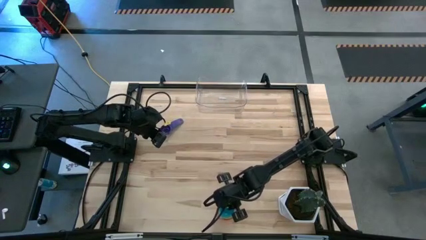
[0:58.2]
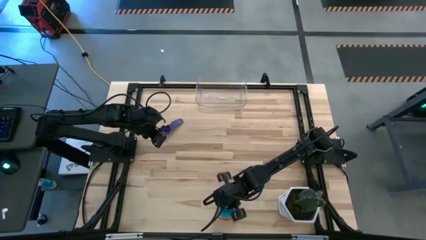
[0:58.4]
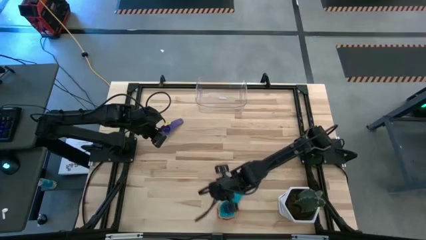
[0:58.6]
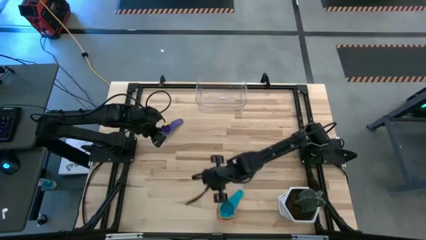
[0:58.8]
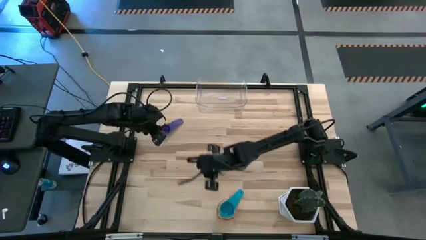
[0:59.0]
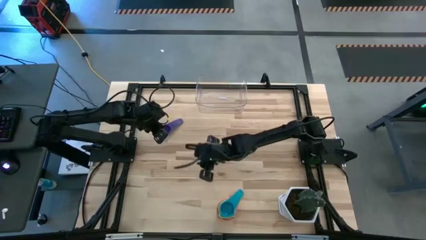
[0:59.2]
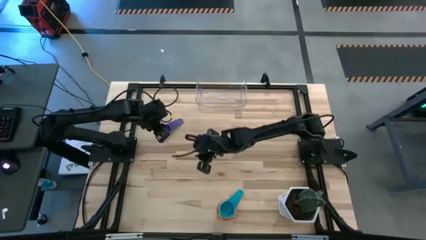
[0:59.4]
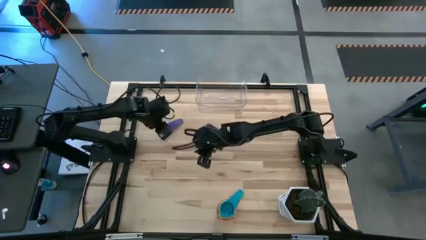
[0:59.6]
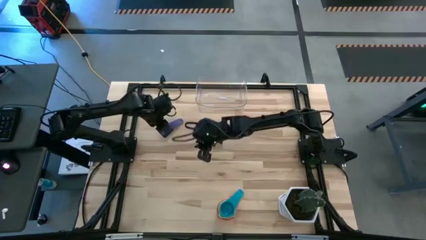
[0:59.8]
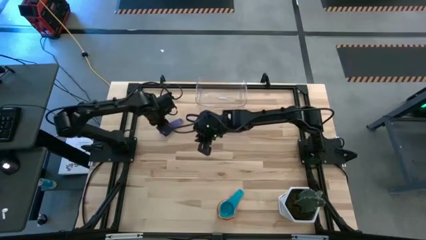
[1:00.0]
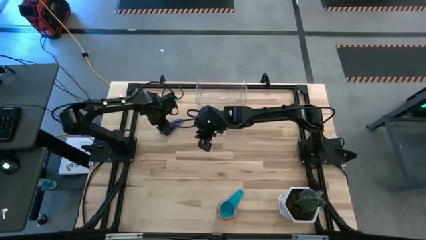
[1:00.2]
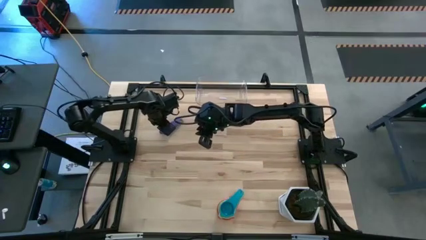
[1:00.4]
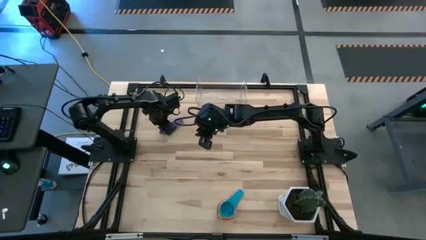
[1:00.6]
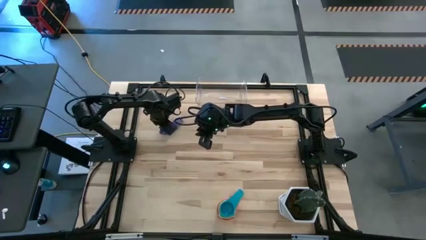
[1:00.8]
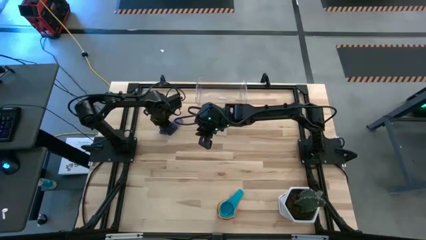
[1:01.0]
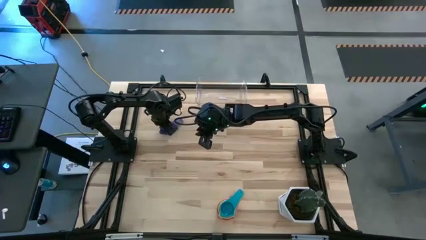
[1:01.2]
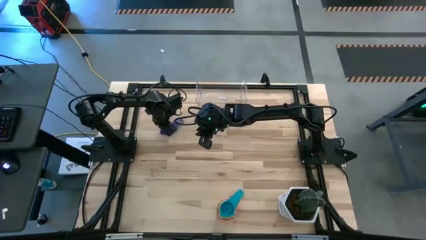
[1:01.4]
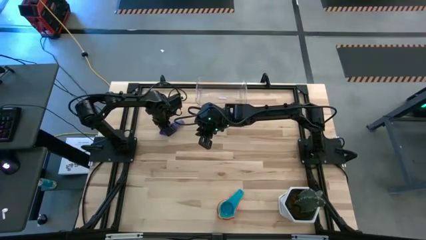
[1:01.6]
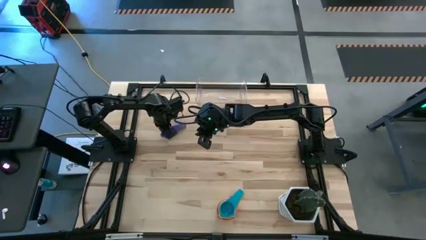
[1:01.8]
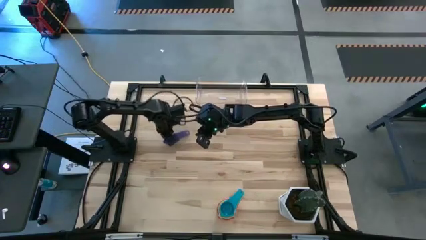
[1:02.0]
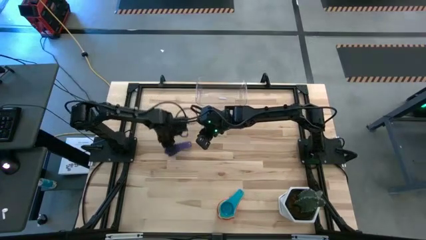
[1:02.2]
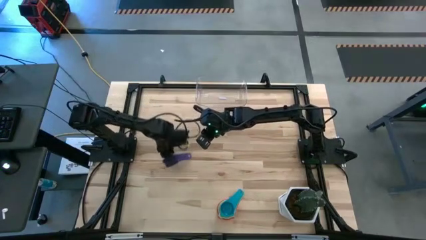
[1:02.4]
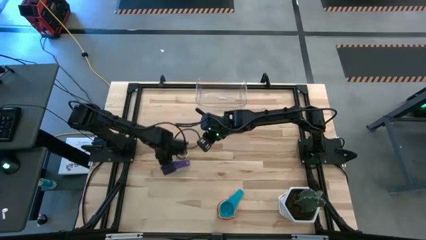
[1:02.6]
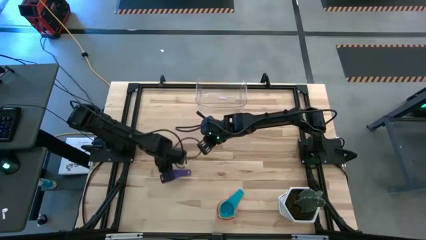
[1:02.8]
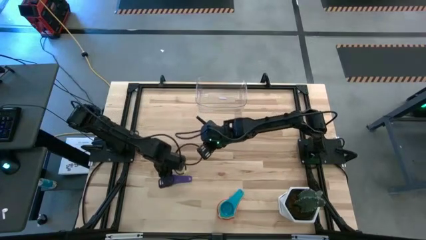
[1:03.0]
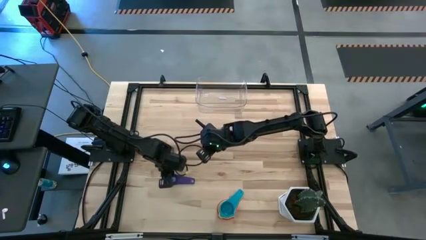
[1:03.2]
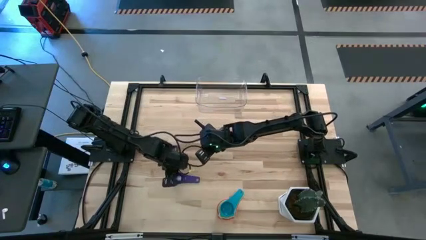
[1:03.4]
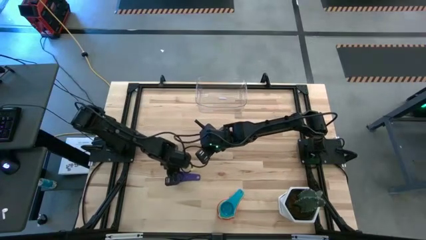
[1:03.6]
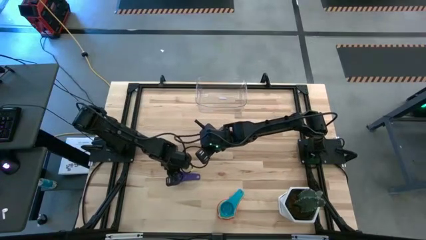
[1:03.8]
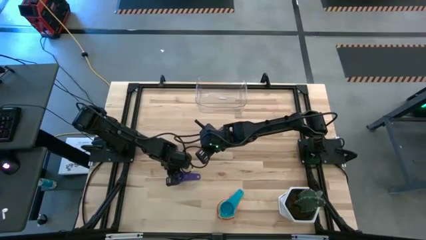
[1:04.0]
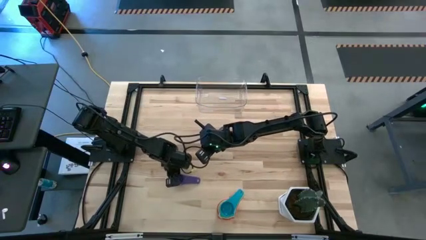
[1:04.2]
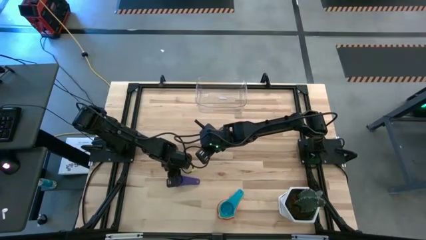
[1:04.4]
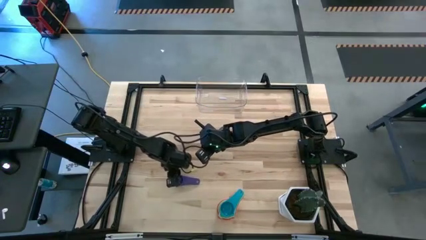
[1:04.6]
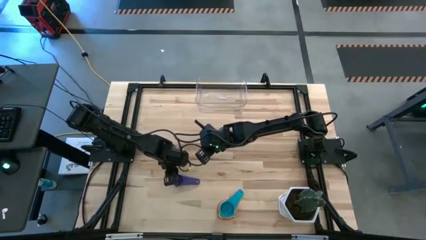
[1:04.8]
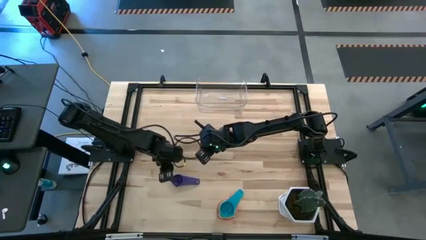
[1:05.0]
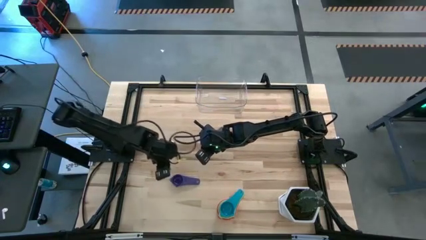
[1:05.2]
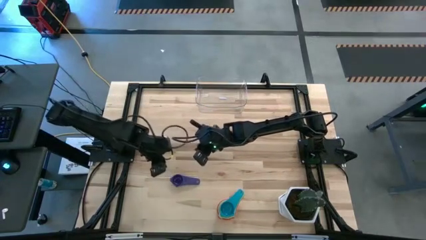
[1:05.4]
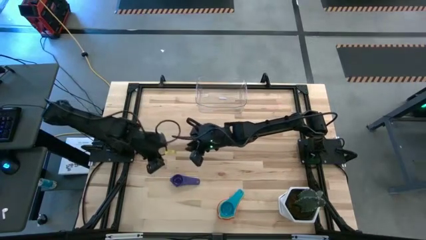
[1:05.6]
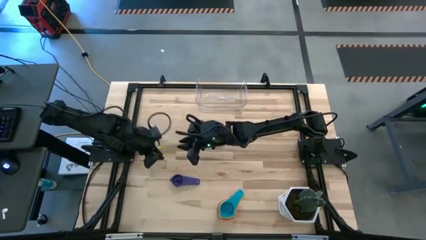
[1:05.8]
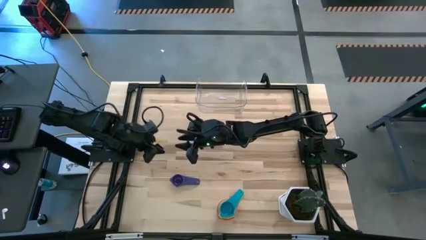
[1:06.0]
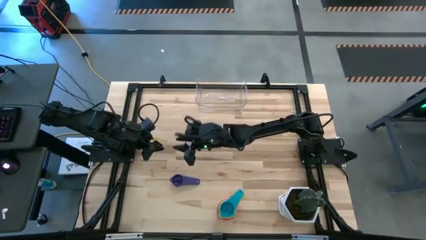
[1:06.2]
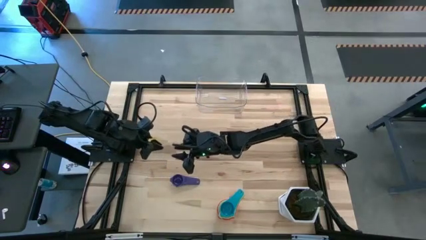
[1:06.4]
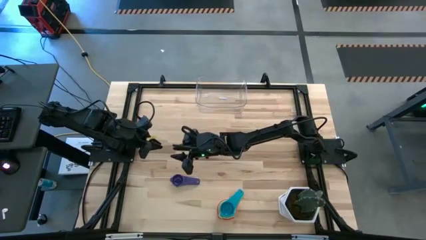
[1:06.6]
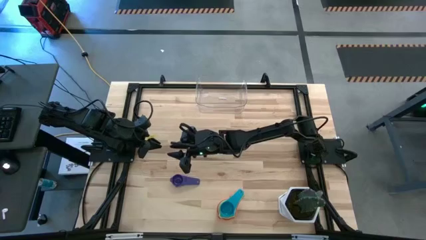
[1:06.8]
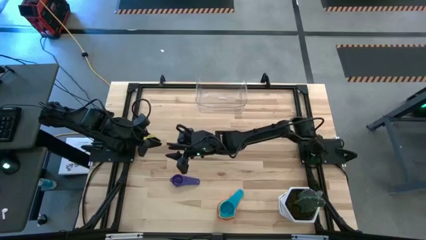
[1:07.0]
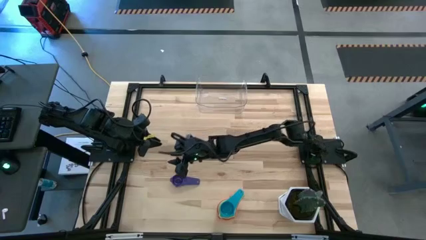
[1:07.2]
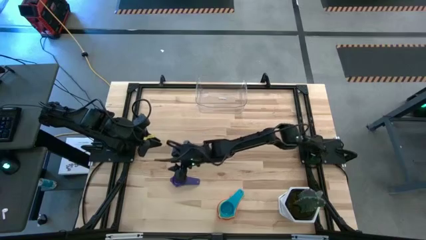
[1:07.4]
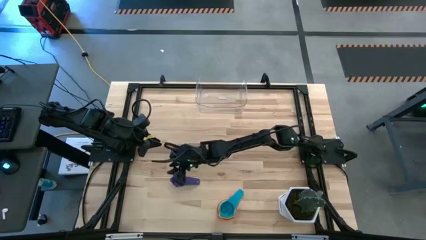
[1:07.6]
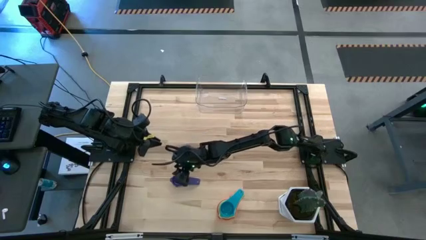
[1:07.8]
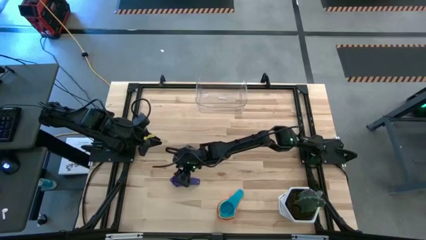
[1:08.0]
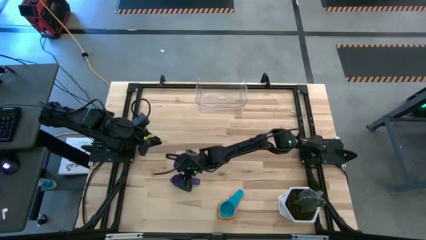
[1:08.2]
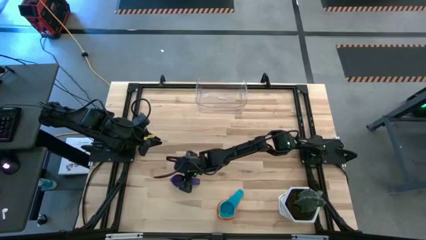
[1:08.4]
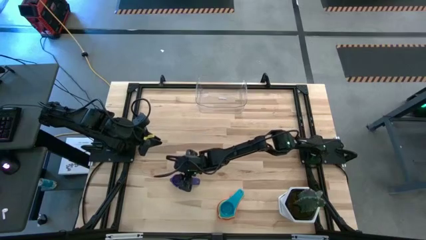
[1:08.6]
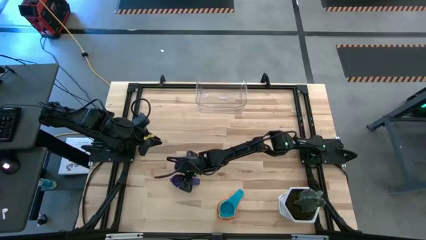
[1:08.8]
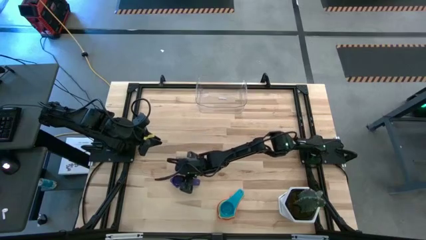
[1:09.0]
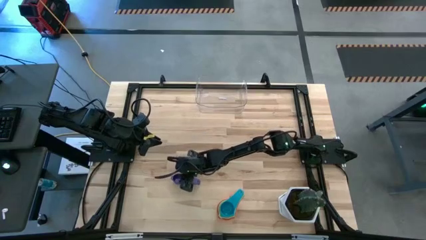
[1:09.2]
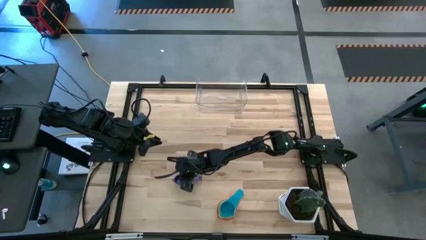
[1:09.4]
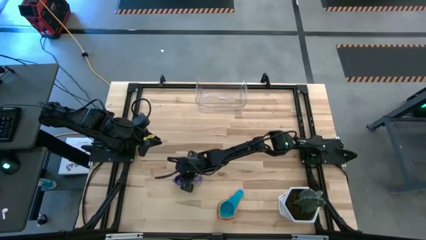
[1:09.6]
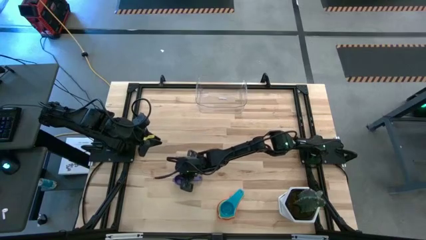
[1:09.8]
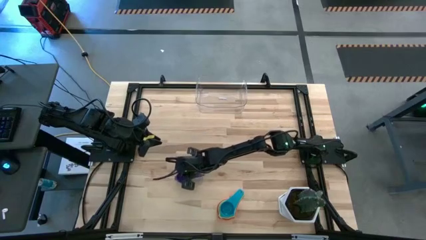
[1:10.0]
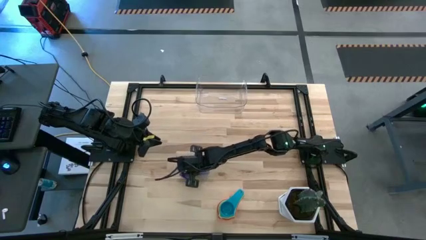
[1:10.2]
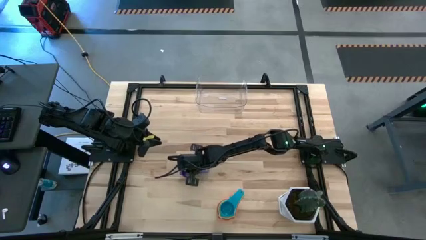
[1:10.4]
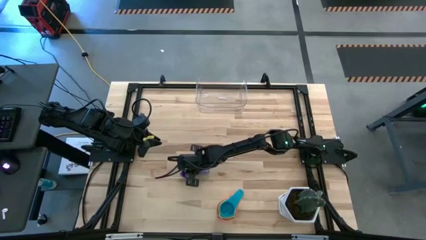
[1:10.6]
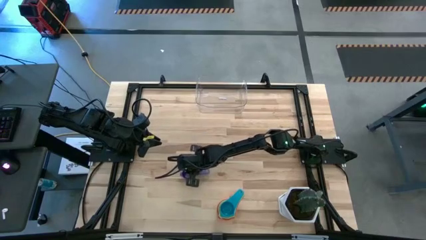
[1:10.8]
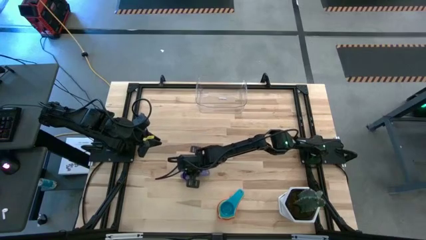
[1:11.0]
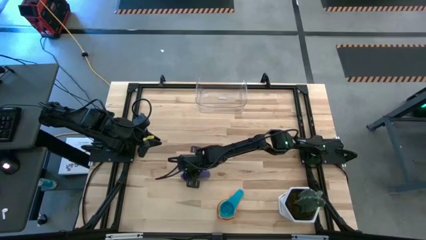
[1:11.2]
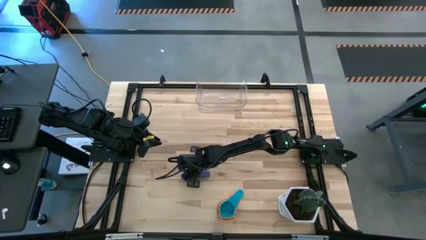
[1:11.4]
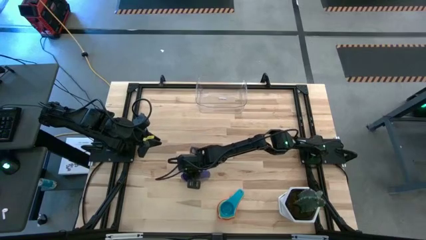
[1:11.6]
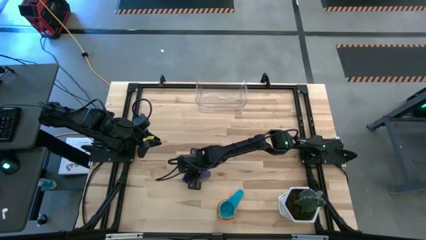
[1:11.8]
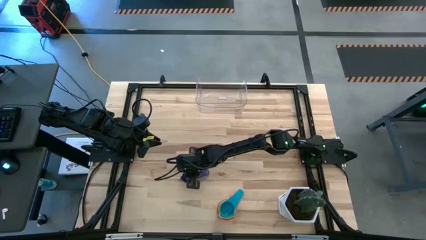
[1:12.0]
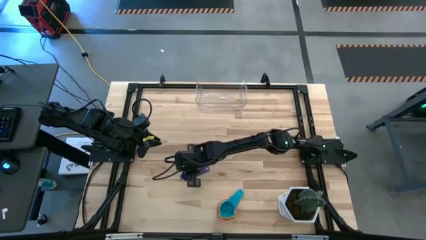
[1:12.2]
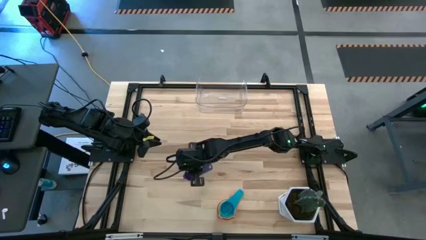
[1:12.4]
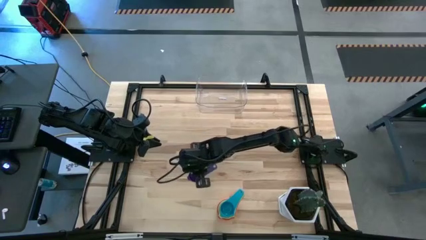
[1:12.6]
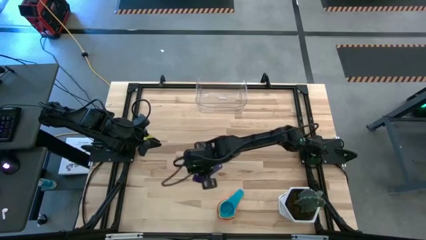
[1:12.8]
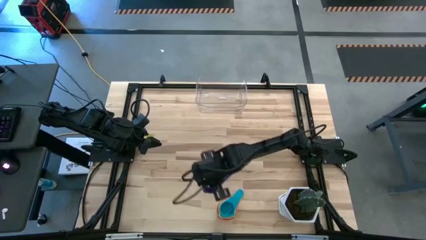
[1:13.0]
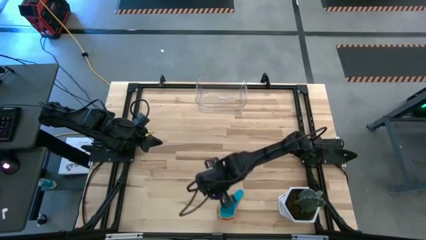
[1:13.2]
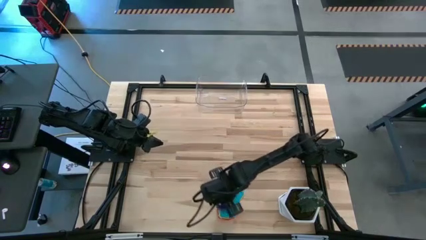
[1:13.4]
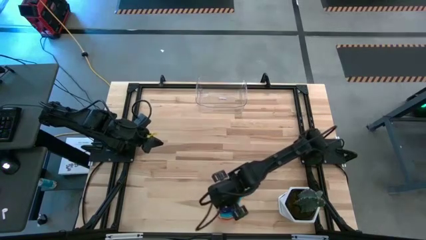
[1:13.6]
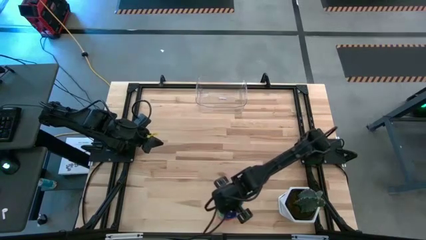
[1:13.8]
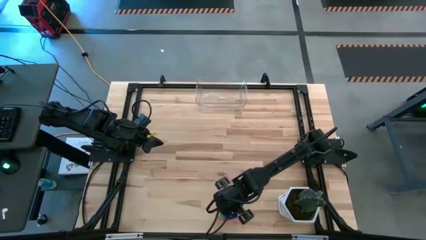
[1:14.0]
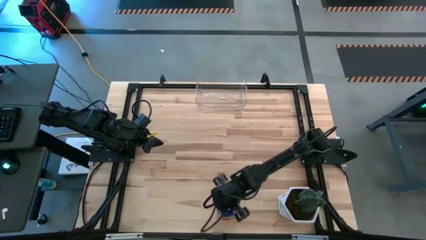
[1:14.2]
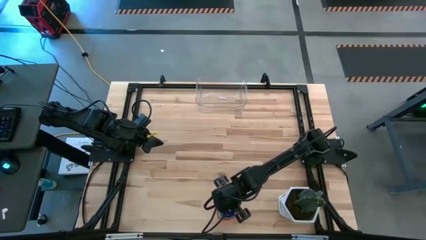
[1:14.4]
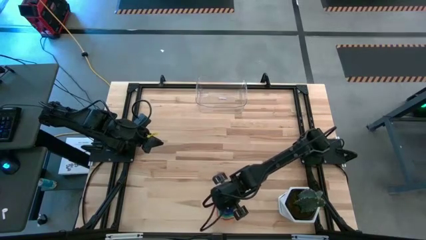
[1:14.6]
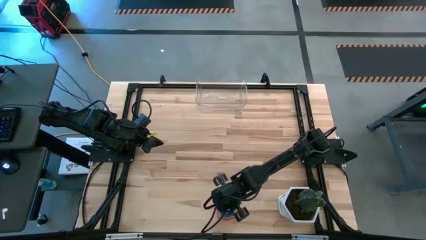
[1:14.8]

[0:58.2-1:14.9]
Task: Nest measuring cups in basket
Stack the dark blue measuring cup on the light blue measuring cup
